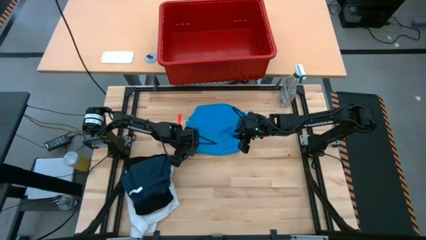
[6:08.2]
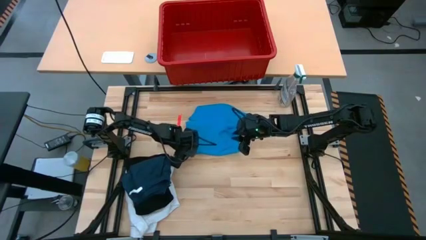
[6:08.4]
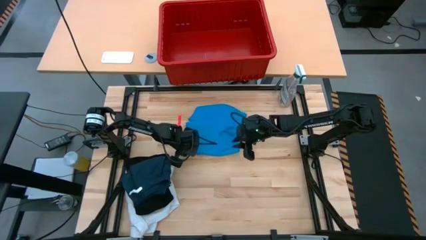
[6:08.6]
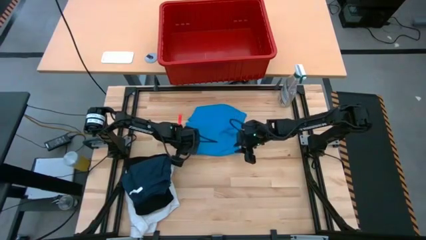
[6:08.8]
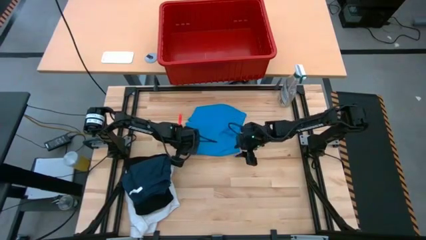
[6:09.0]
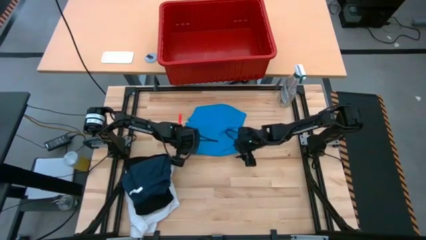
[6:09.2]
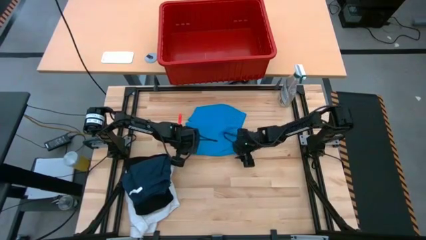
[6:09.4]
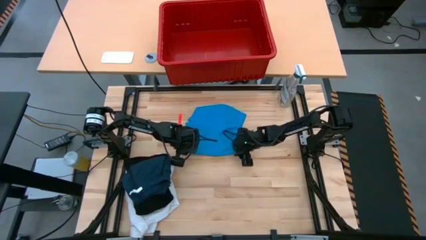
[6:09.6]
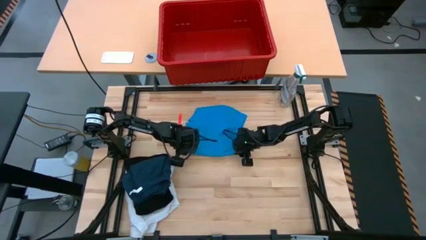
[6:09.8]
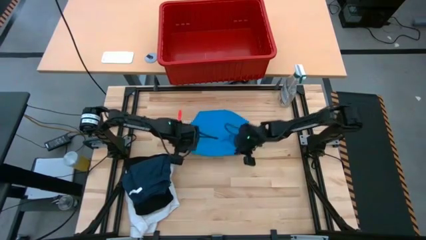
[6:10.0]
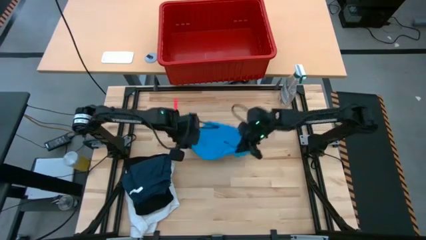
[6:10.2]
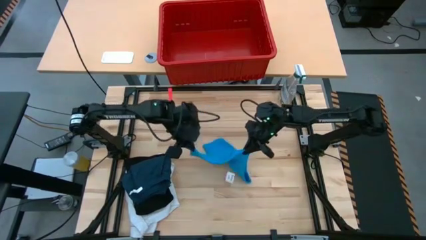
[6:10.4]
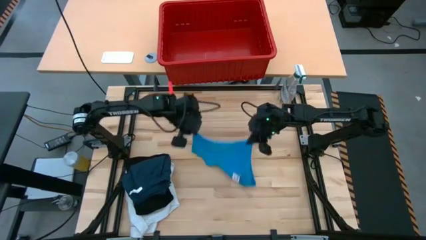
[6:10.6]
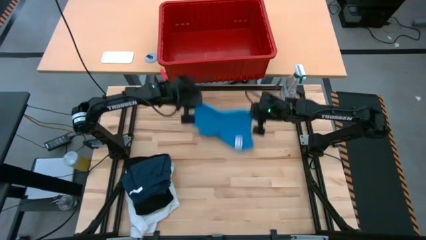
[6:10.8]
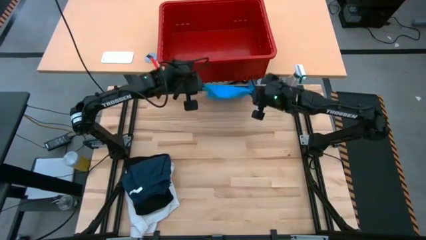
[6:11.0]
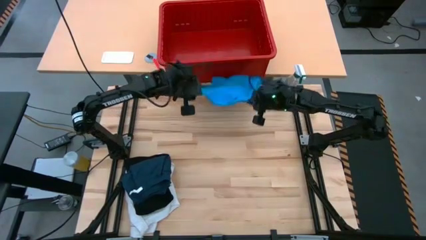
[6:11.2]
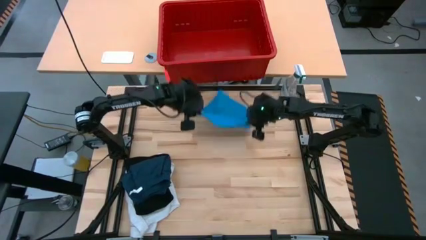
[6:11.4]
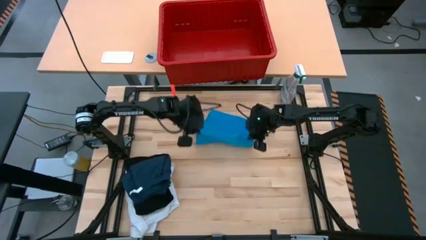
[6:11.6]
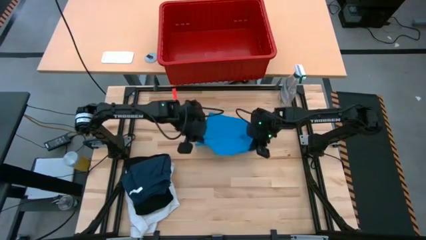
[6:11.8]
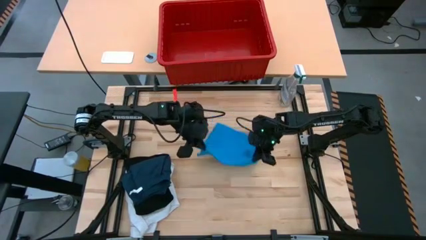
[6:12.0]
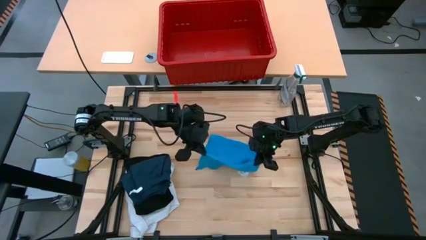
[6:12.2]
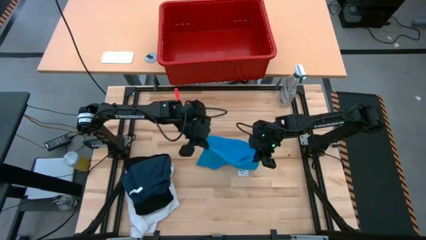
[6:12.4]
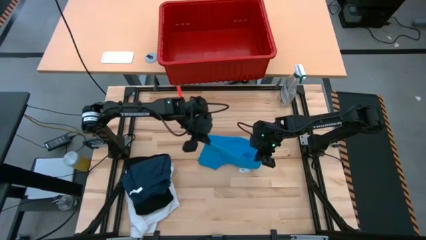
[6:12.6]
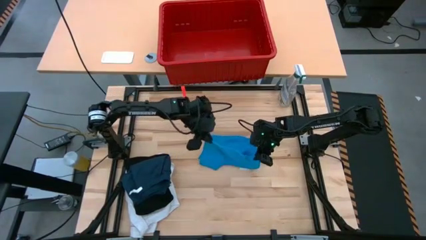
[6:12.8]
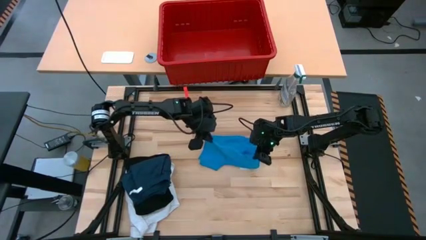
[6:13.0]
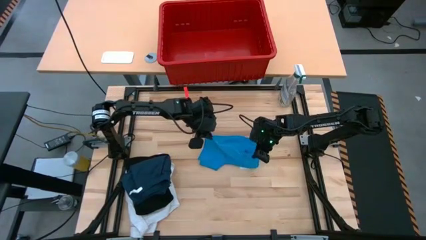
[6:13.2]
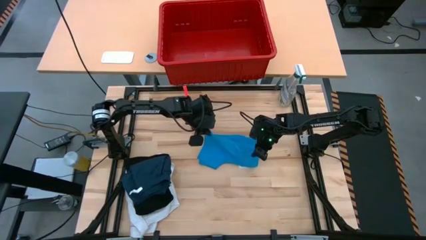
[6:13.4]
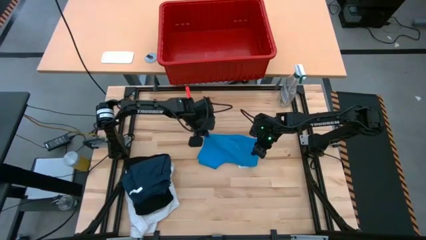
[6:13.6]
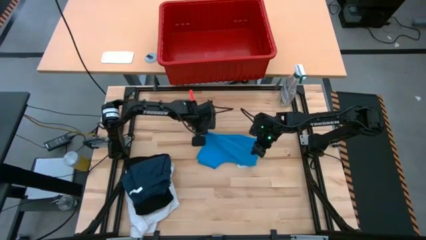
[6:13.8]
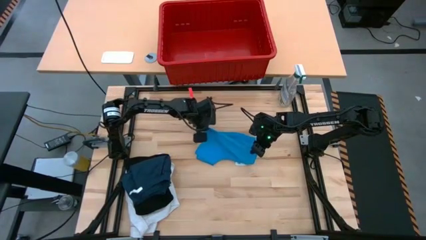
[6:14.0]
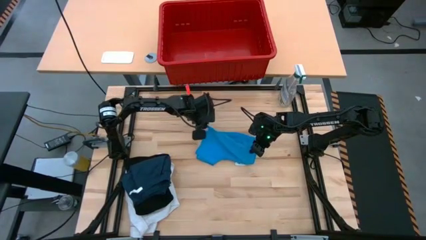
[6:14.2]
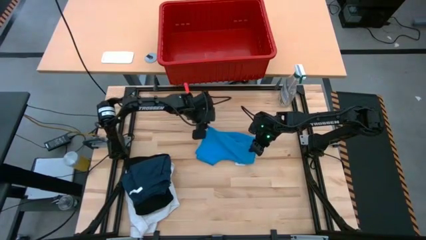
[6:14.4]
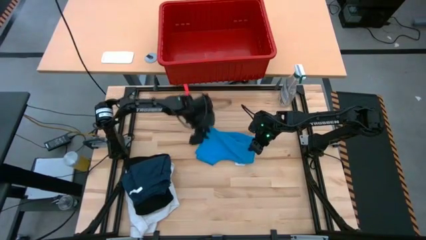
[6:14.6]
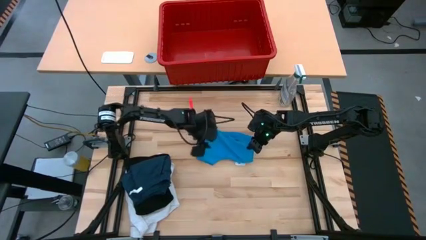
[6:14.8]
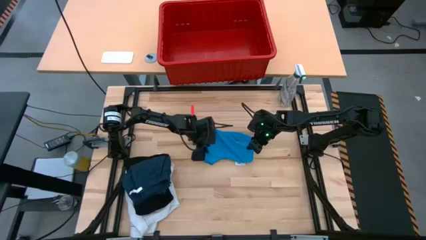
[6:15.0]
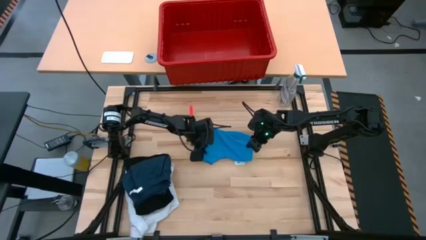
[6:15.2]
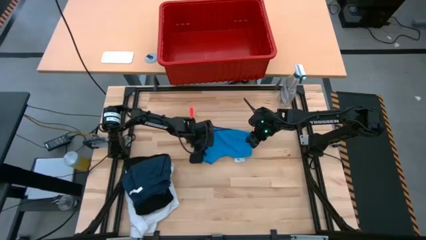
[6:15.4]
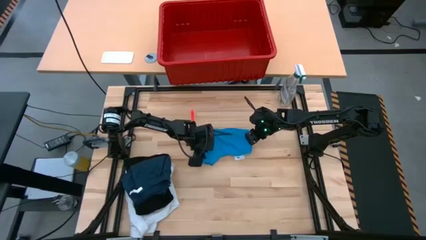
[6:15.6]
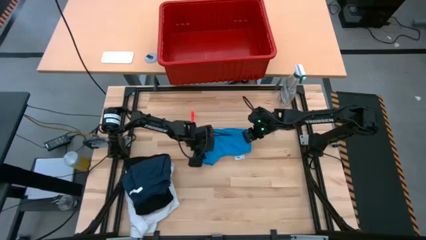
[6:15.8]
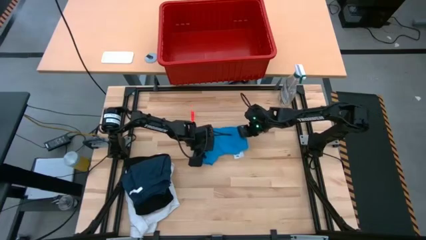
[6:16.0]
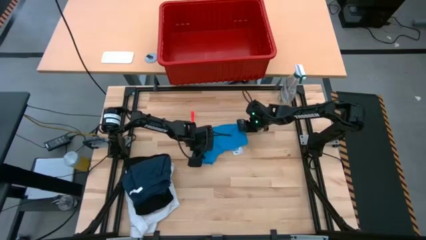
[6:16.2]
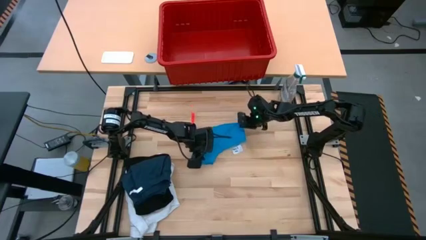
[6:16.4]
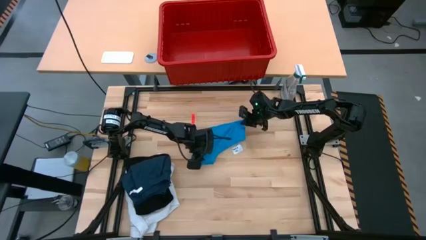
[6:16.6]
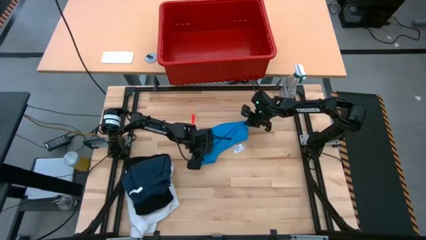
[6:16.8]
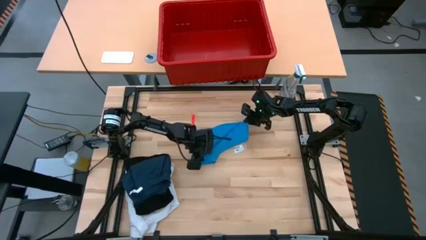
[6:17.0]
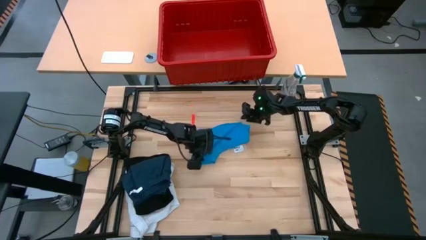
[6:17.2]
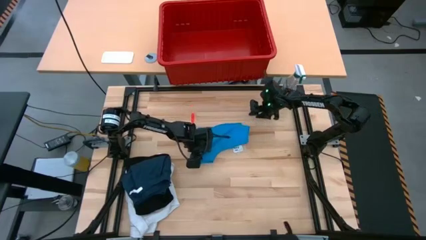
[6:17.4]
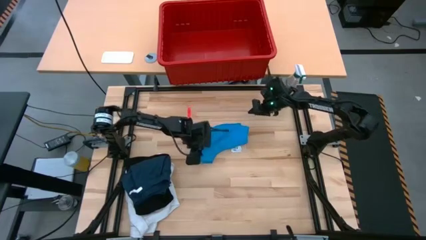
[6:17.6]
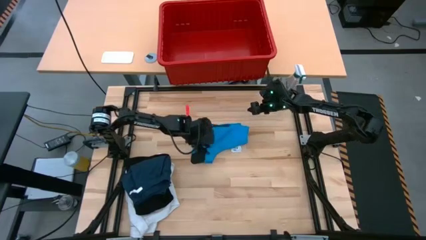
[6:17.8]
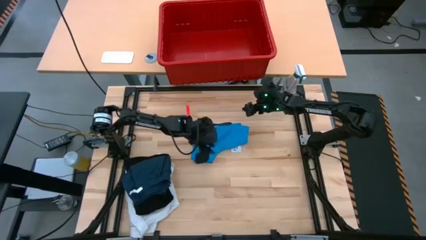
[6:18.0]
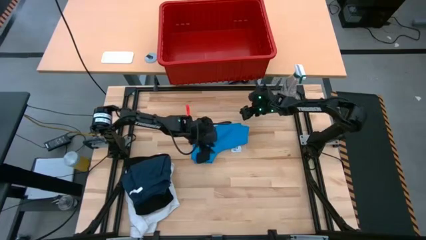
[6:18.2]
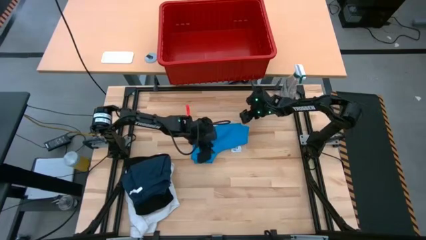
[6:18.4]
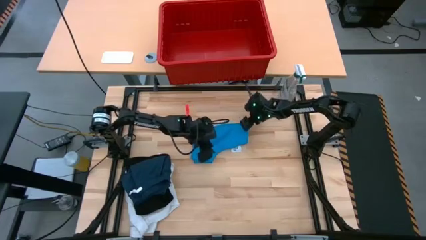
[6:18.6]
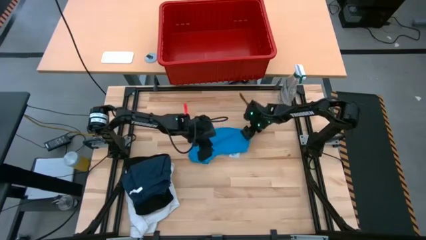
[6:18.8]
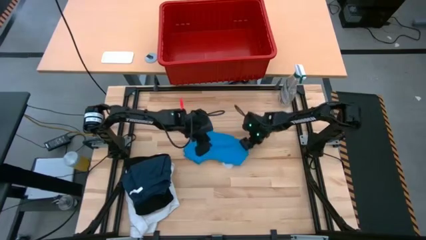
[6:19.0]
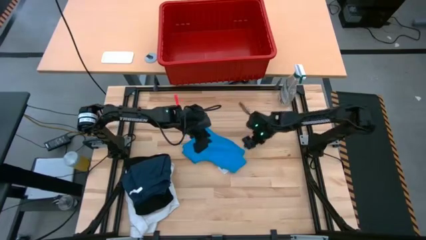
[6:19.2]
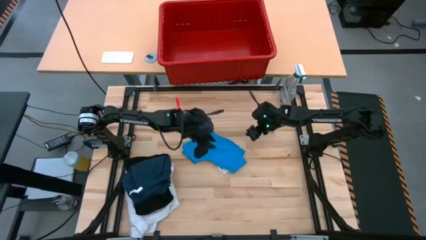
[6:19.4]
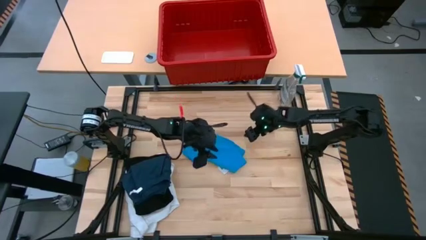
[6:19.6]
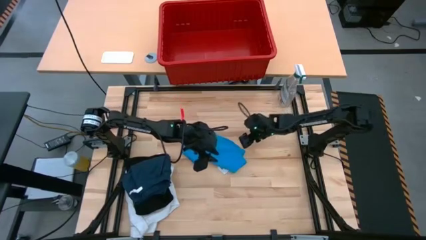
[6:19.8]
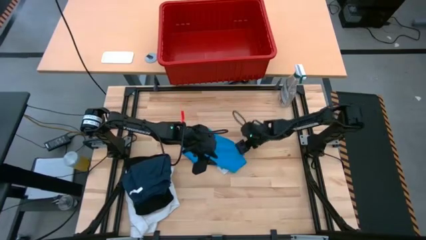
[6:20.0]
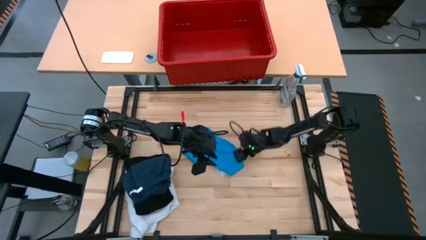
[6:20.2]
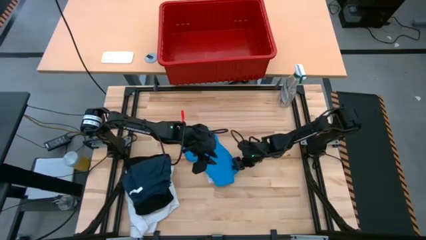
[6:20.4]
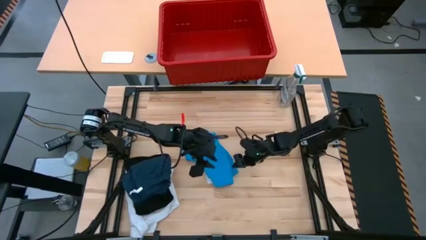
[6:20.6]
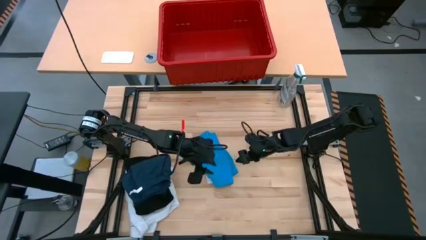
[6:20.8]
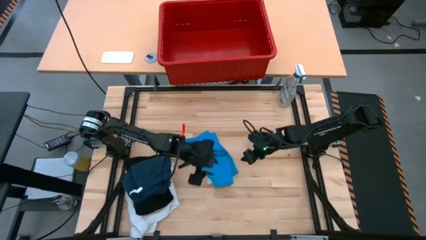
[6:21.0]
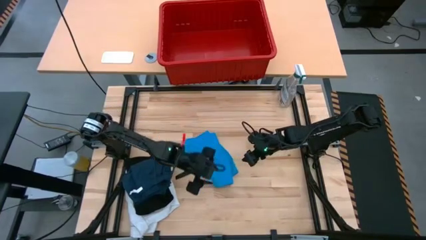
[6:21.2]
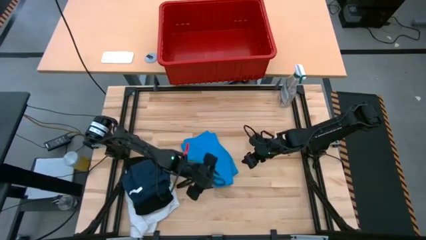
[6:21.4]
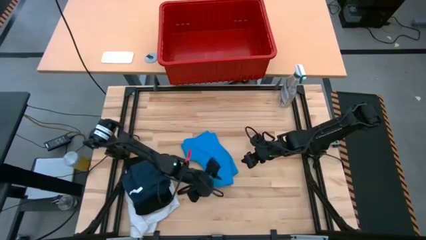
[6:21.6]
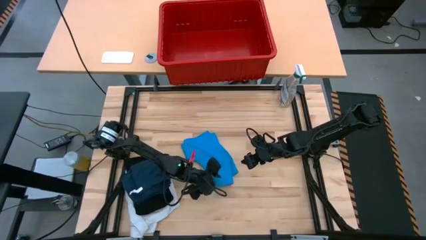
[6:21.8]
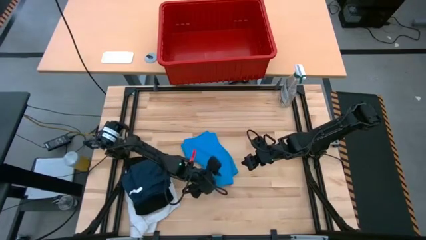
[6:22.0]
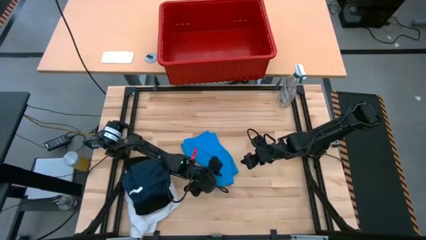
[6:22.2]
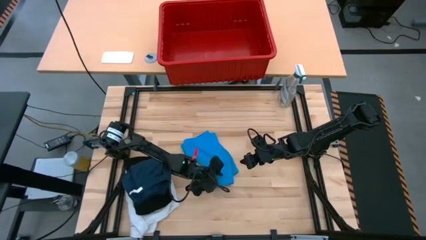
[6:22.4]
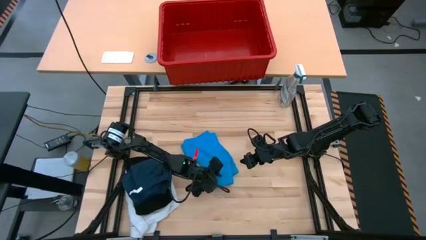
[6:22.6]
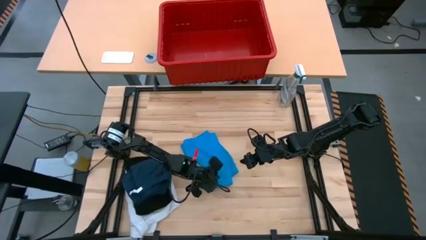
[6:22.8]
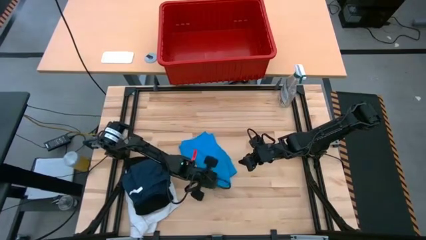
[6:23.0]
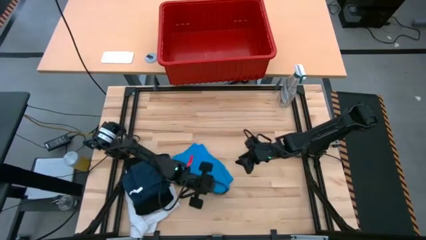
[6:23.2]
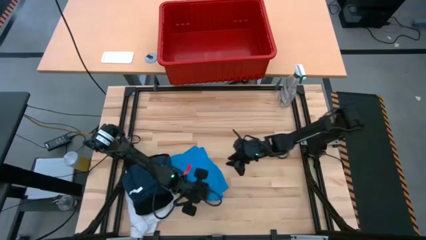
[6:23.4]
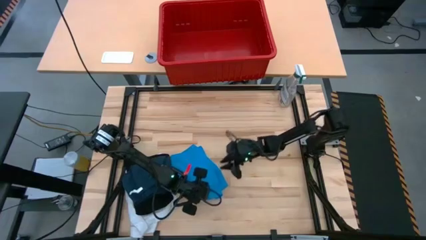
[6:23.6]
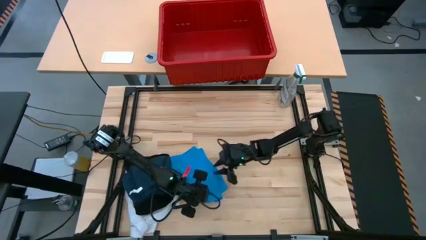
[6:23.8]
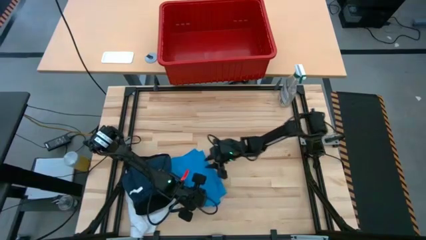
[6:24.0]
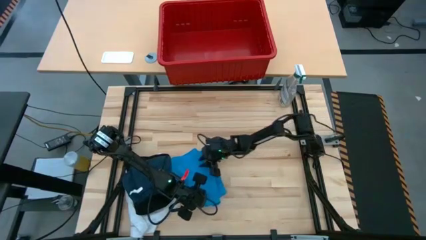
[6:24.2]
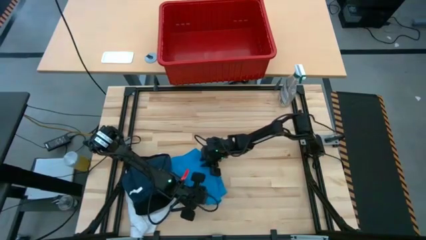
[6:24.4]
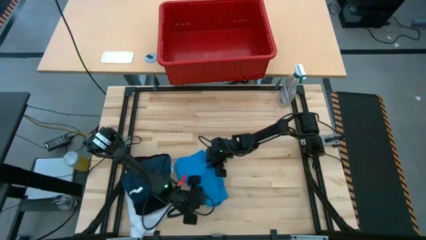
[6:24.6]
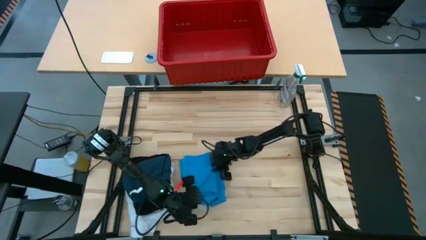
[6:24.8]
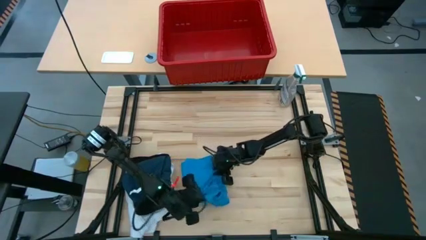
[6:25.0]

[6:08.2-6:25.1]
Task: Fold Laundry from Bin
Fold the blue shorts
